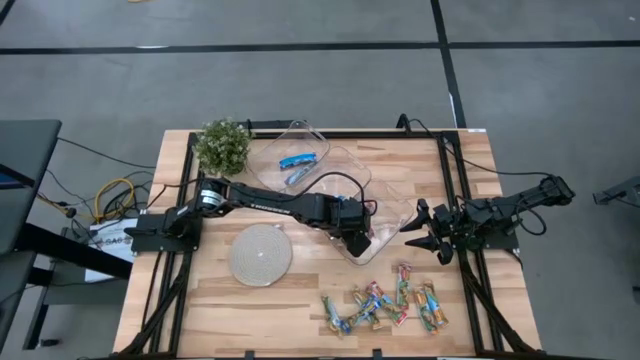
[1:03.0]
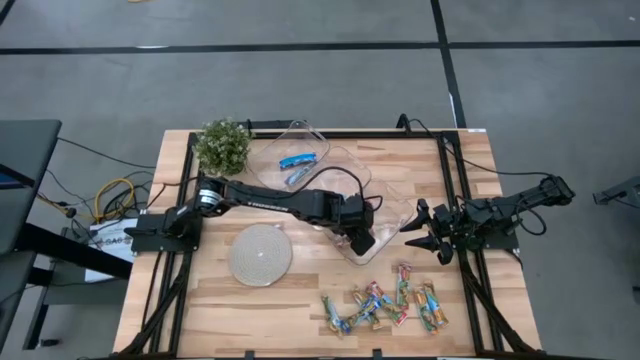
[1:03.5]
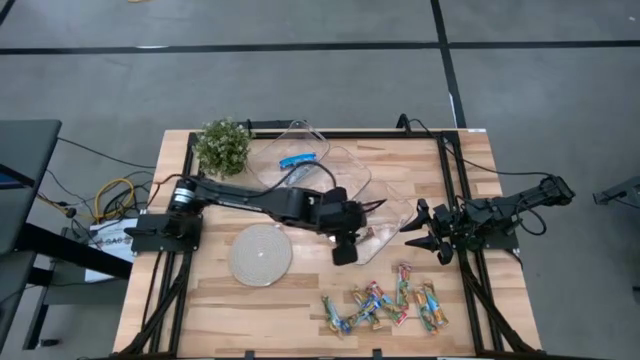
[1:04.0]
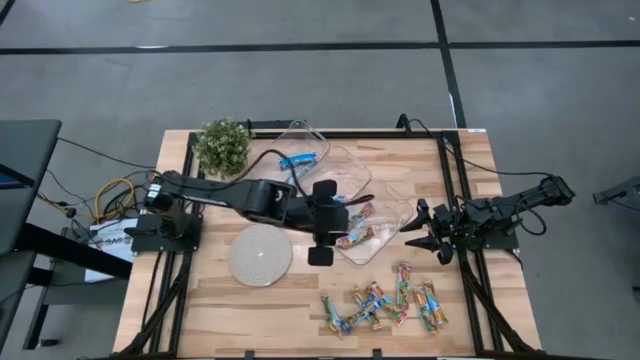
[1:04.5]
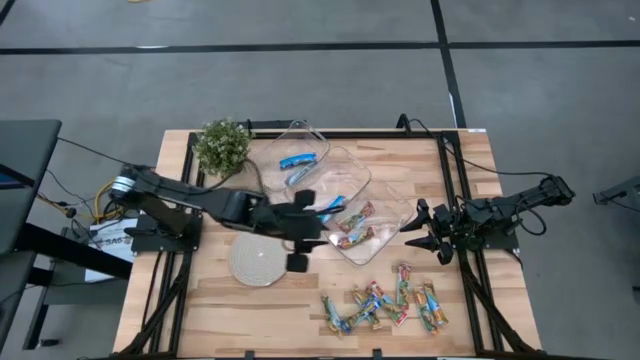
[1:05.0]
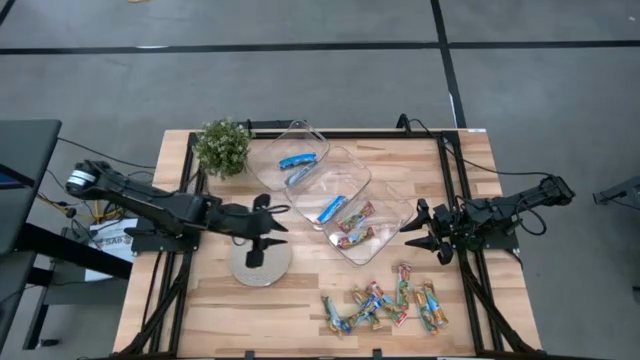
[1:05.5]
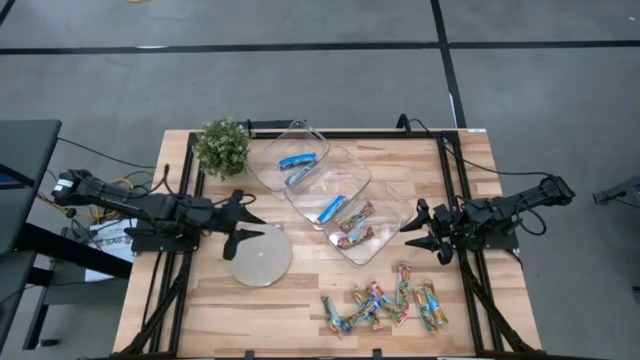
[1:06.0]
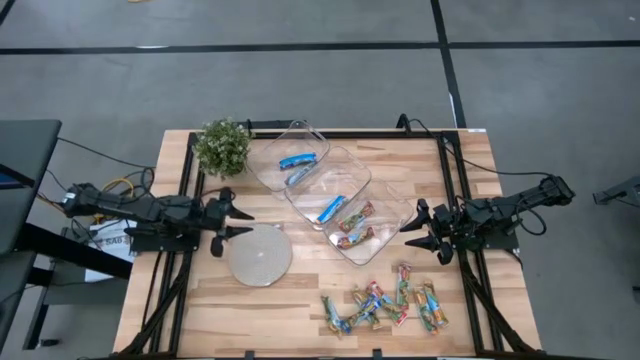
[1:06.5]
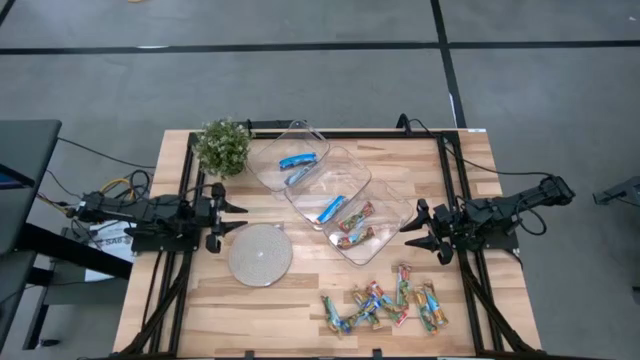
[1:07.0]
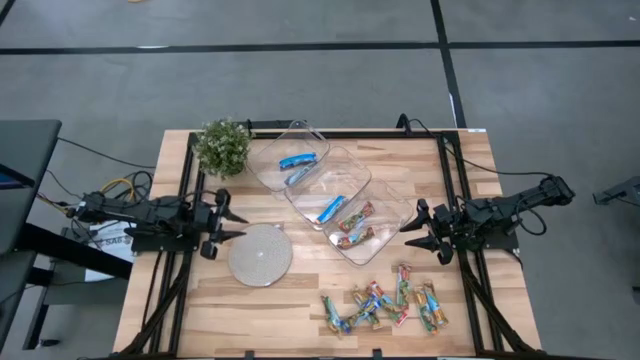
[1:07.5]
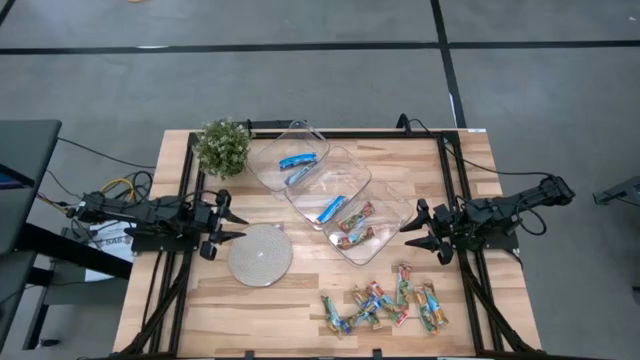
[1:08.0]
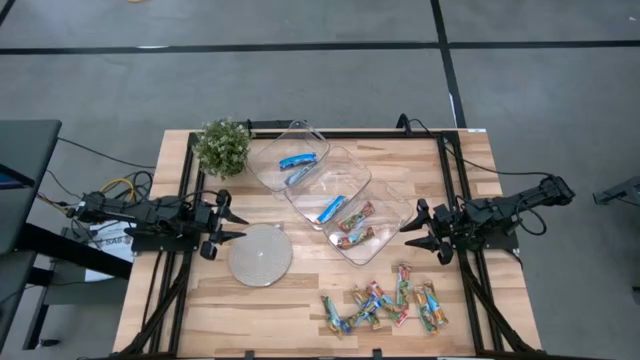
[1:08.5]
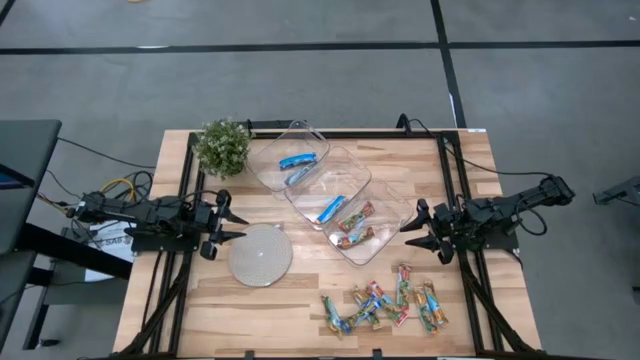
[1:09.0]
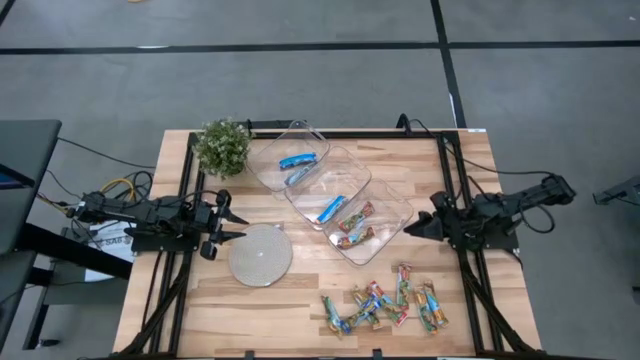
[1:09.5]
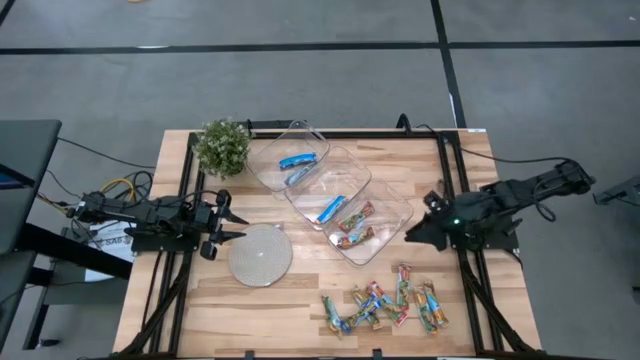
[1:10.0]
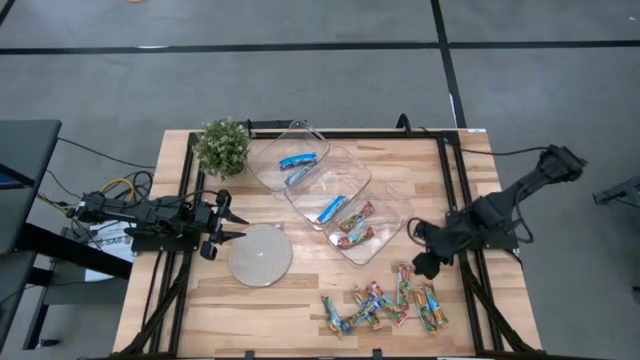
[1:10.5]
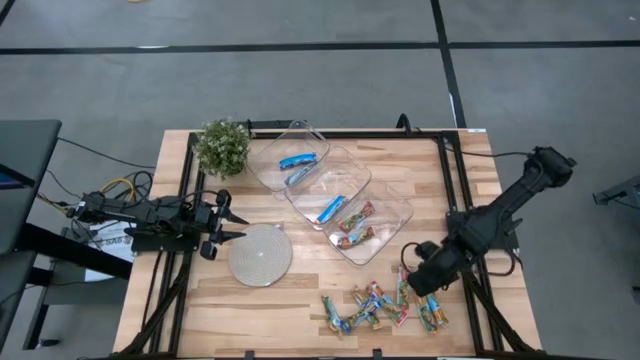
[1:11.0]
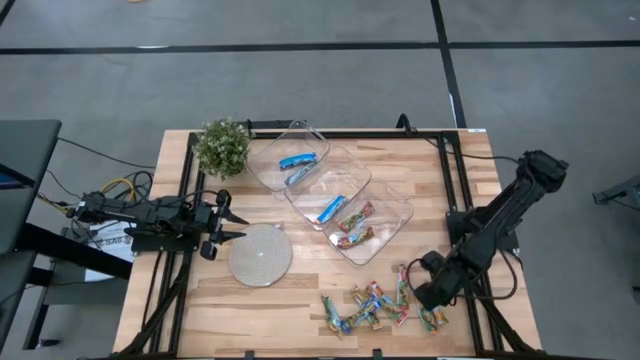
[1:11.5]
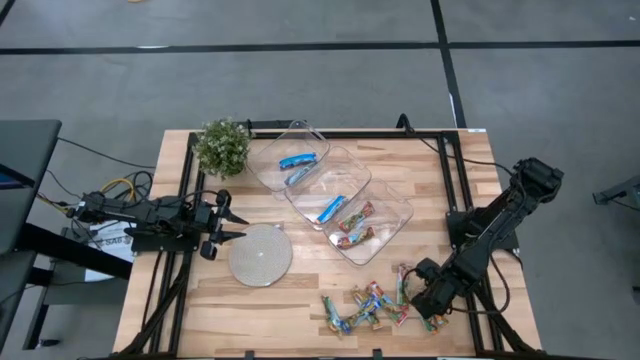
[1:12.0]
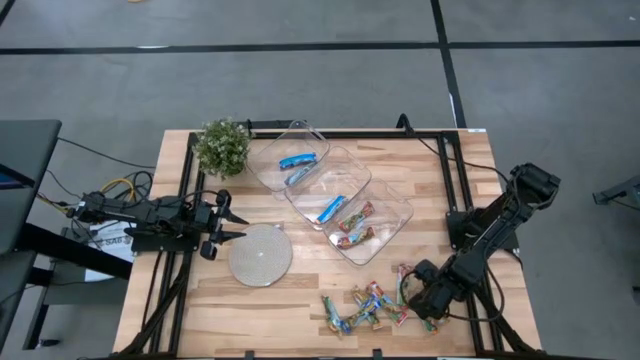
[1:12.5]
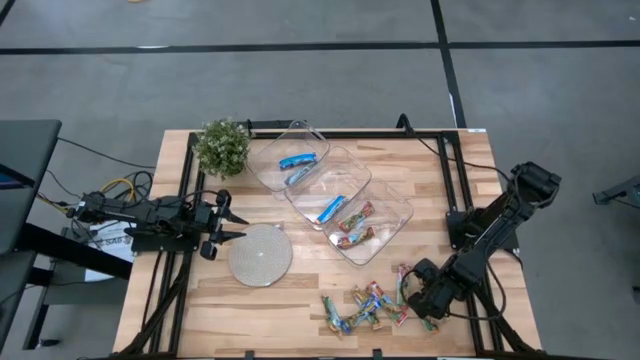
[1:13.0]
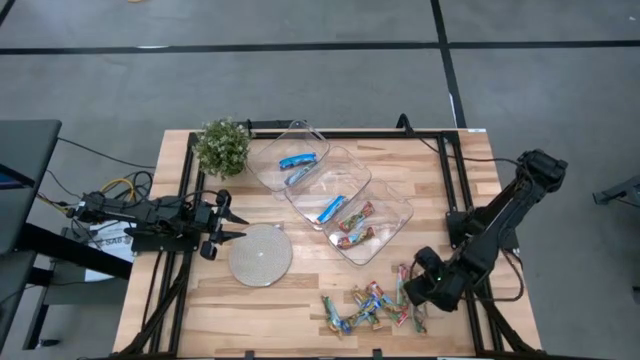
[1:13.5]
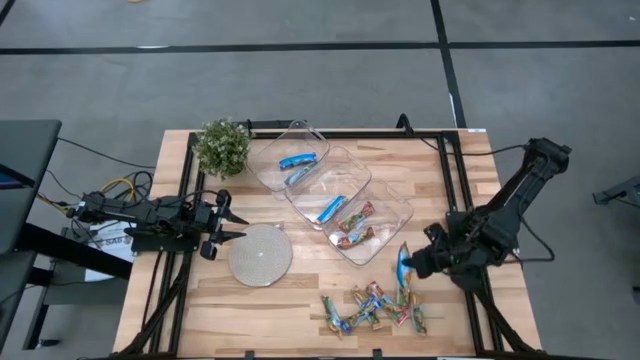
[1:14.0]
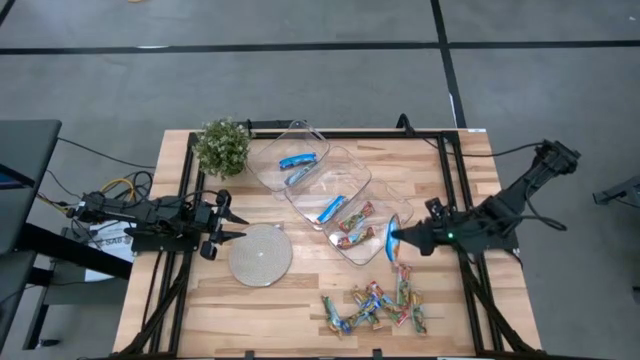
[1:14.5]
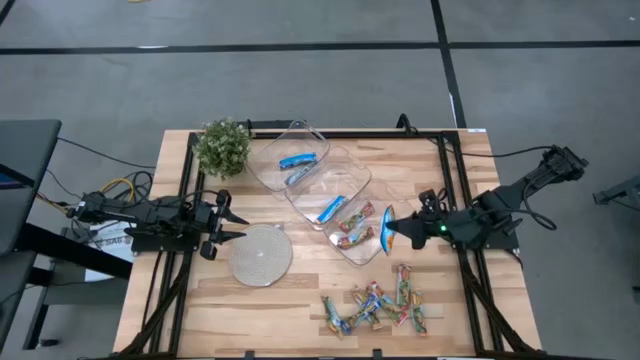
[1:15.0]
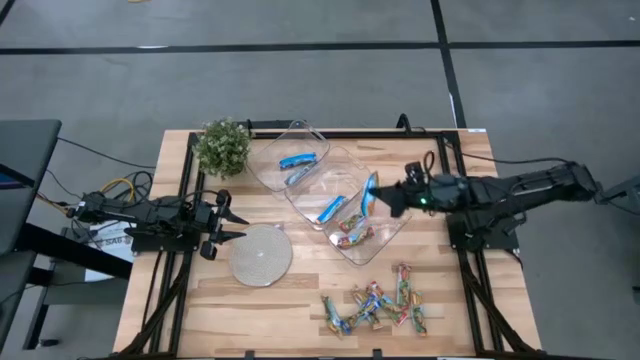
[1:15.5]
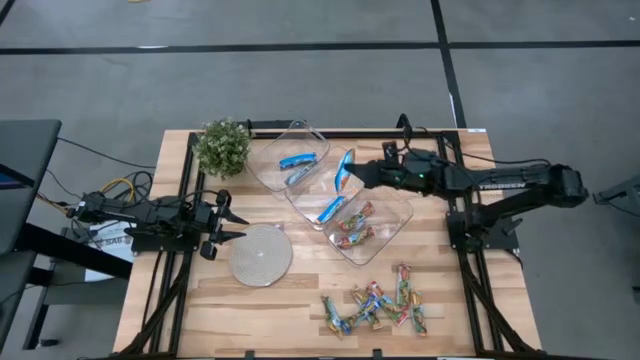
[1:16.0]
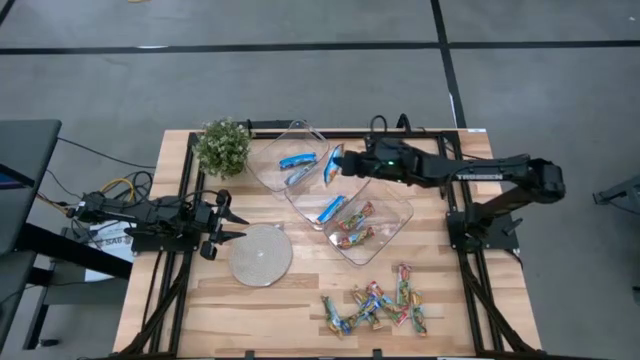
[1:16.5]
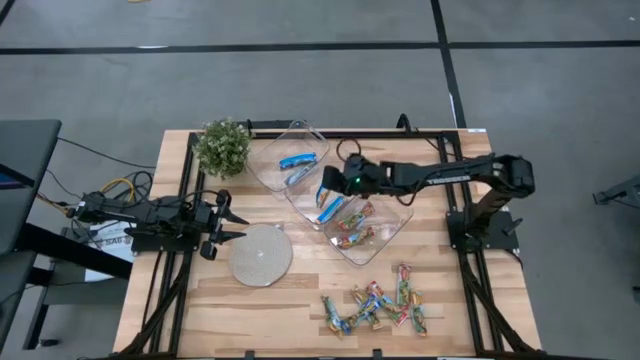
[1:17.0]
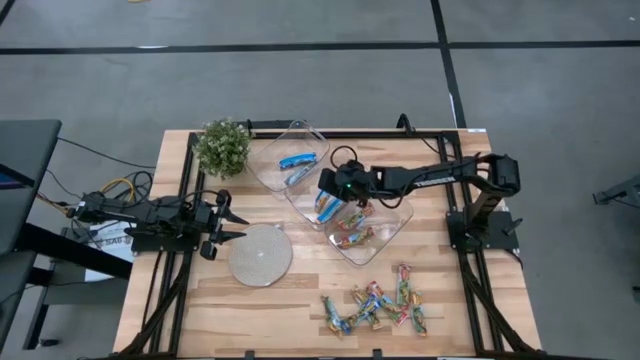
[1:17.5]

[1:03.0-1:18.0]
Task: Pick and place Granola Bars by type
Put the yellow granola bar into the middle transparent bin

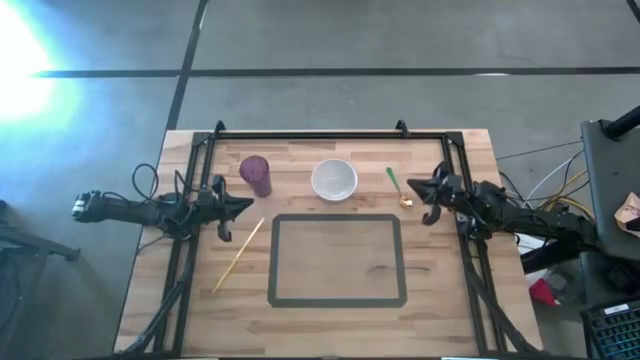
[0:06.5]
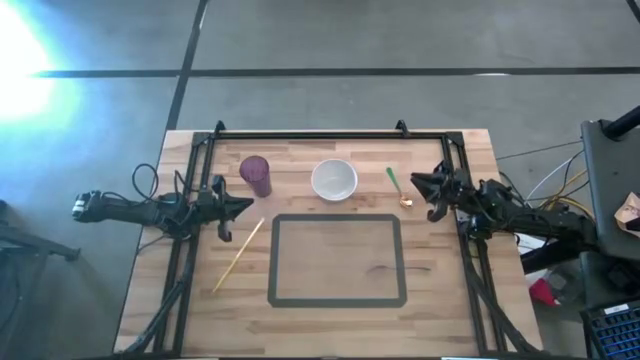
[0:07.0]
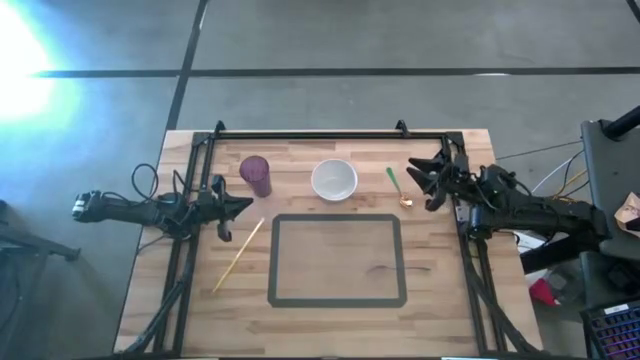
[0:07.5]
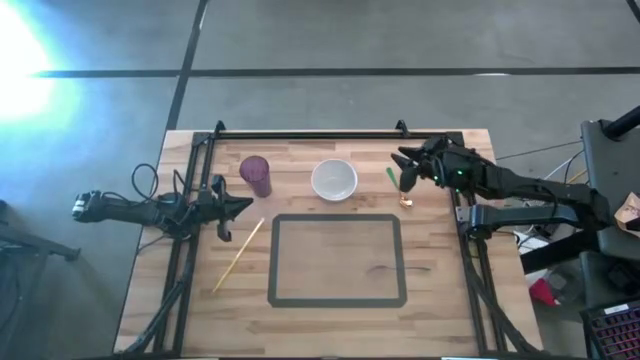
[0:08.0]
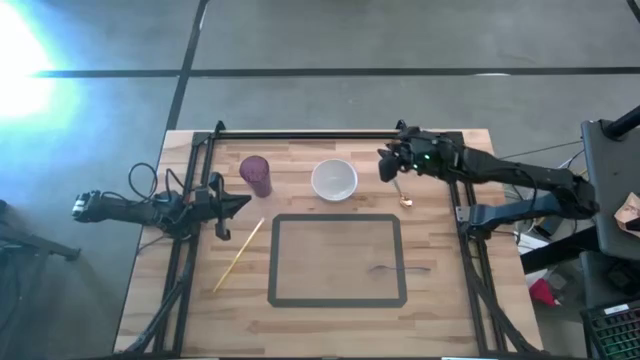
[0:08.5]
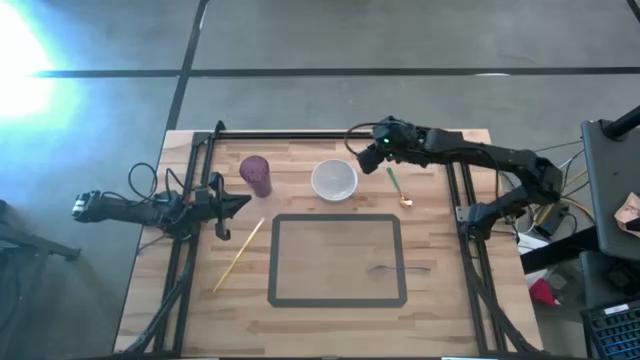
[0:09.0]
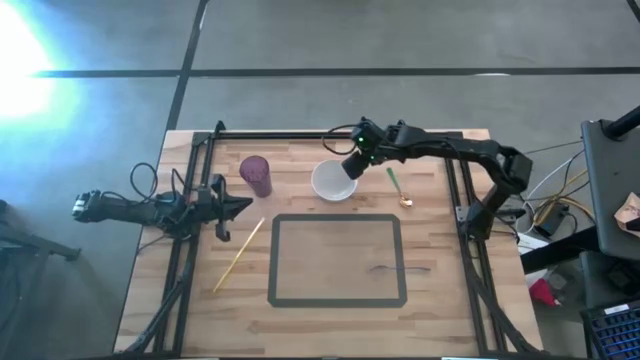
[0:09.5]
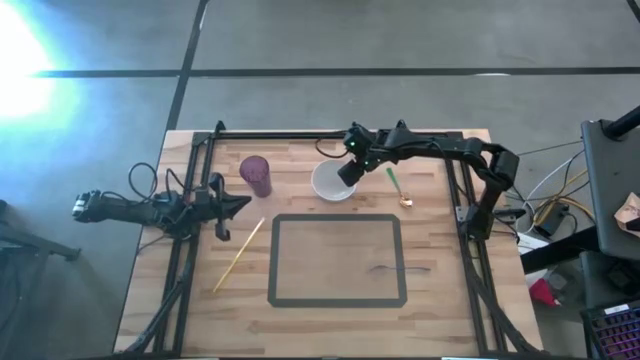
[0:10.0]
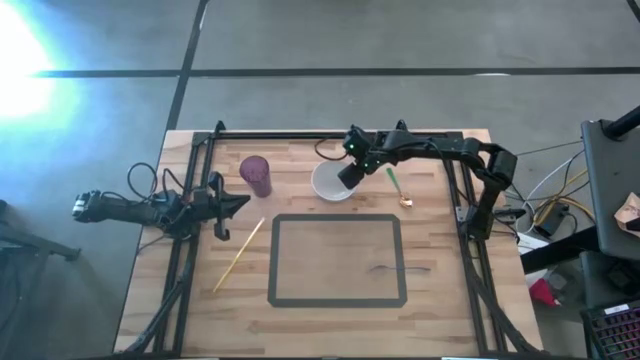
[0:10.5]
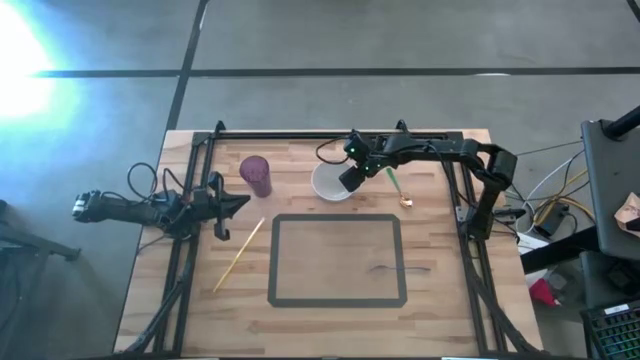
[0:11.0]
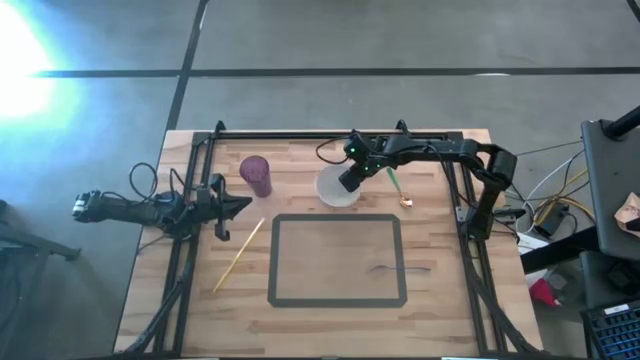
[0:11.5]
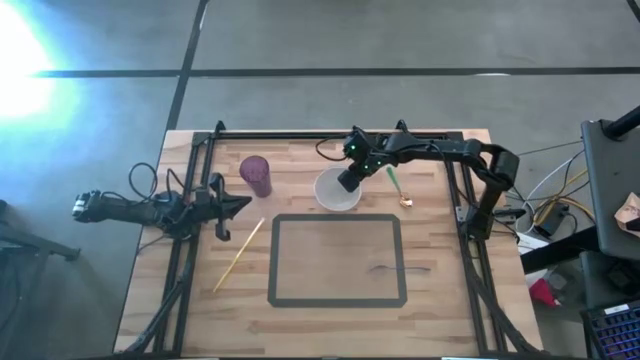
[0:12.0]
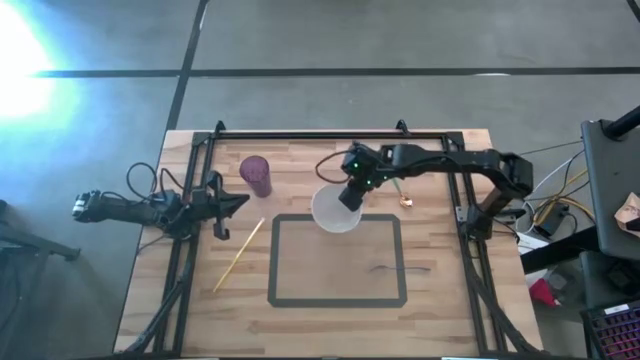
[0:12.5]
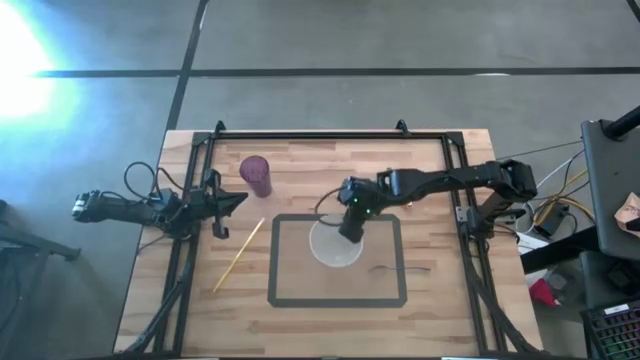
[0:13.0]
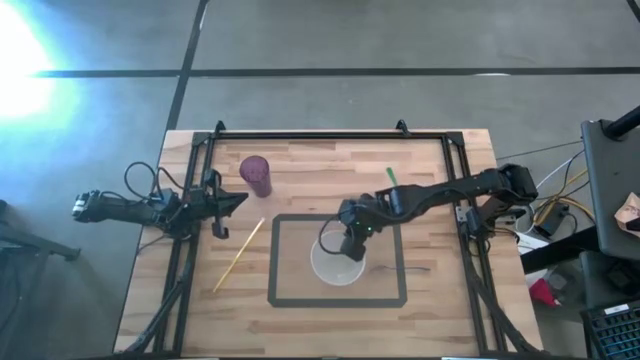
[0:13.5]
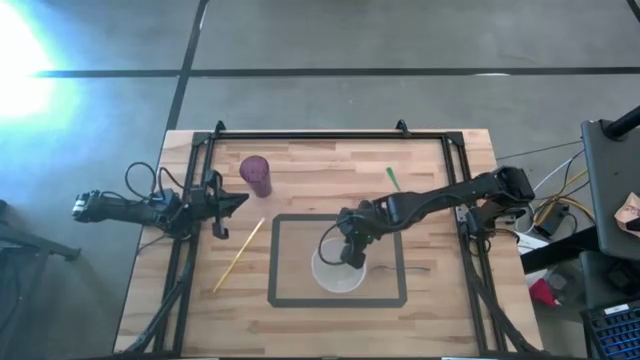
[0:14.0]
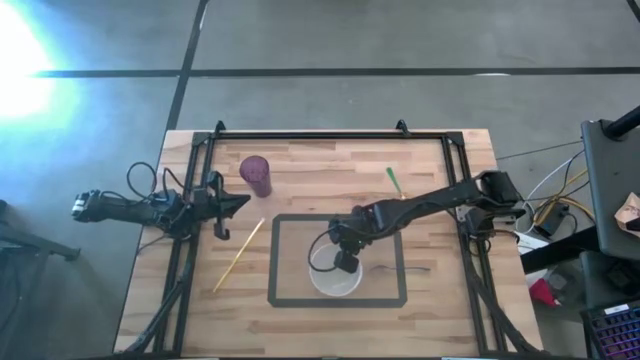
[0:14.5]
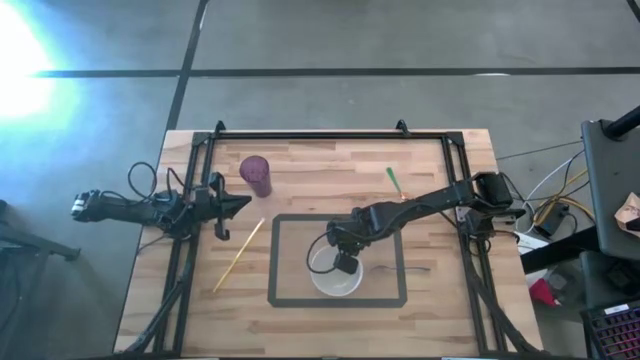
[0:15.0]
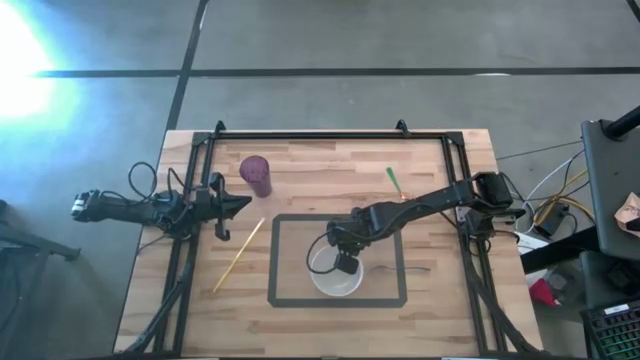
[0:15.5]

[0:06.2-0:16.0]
Task: Pick & Place Utensil
Put the white bowl on the transparent mat
